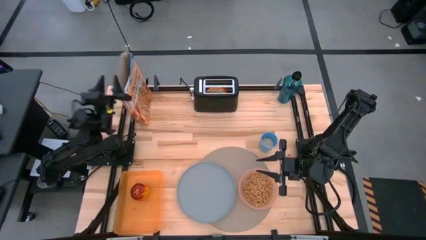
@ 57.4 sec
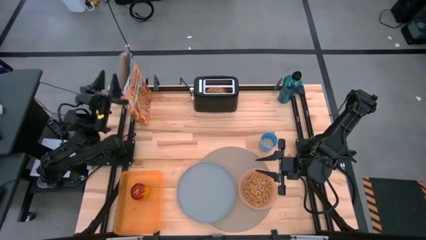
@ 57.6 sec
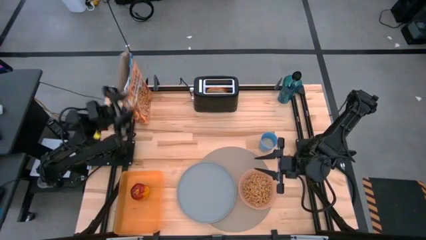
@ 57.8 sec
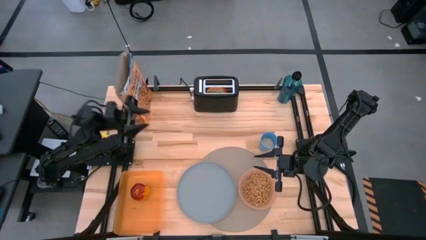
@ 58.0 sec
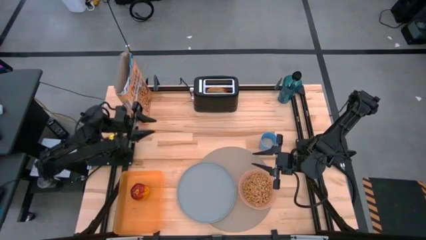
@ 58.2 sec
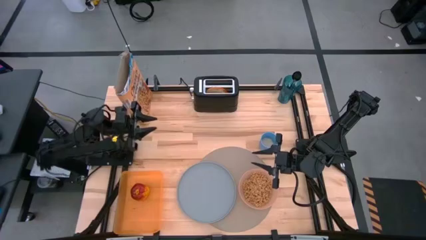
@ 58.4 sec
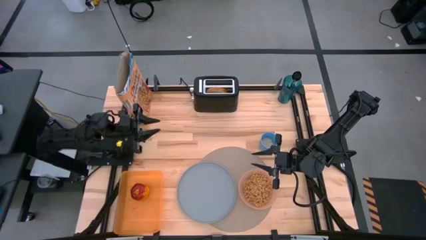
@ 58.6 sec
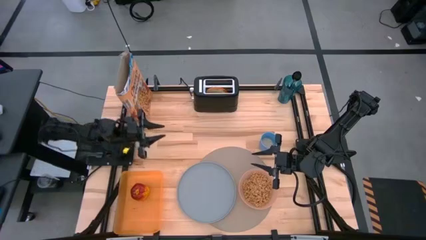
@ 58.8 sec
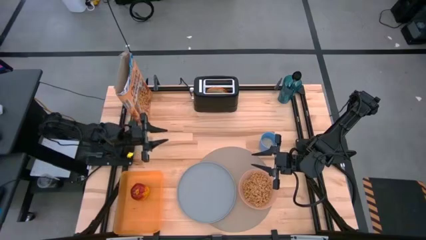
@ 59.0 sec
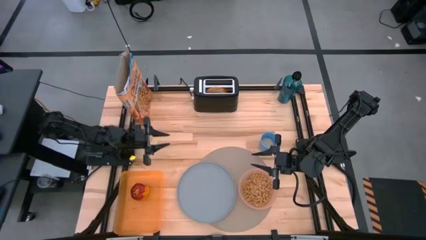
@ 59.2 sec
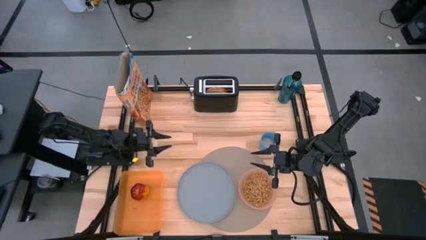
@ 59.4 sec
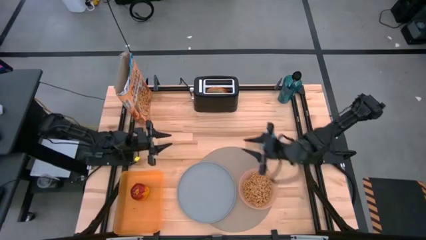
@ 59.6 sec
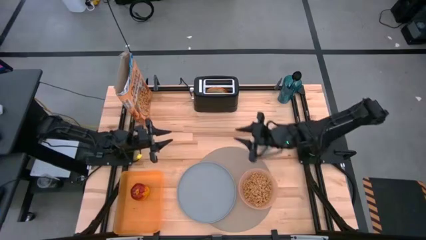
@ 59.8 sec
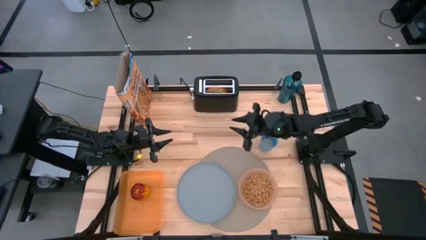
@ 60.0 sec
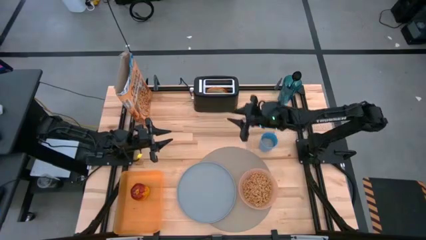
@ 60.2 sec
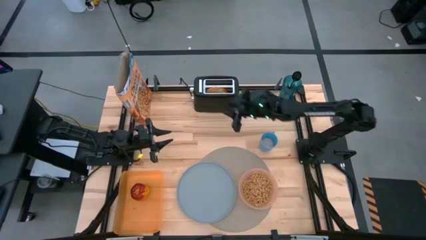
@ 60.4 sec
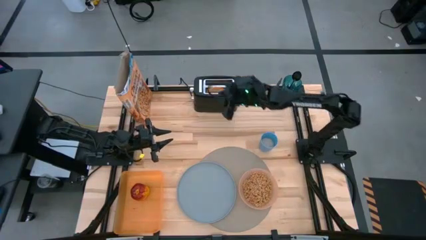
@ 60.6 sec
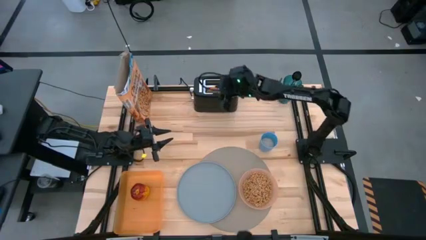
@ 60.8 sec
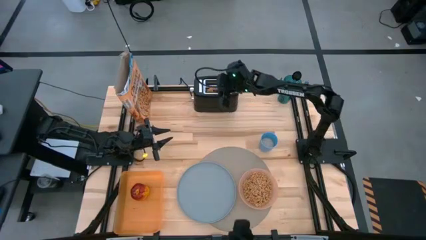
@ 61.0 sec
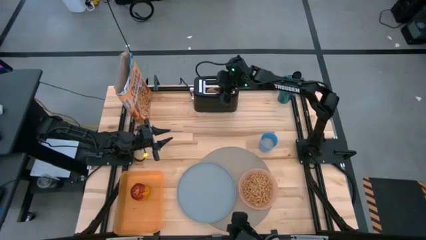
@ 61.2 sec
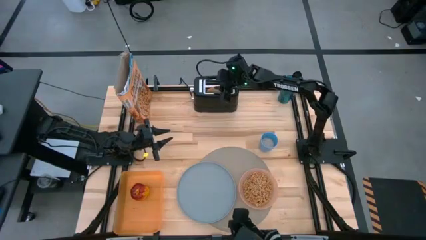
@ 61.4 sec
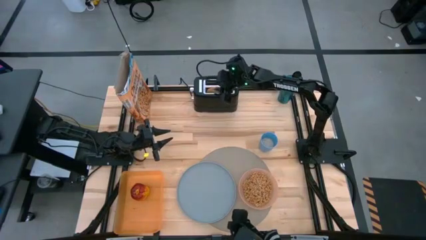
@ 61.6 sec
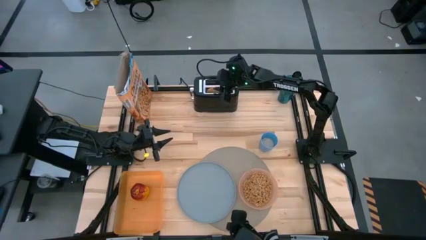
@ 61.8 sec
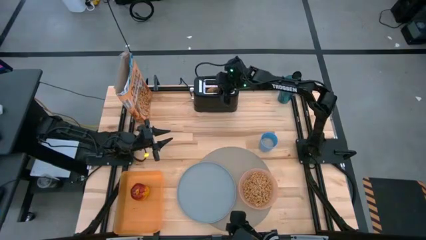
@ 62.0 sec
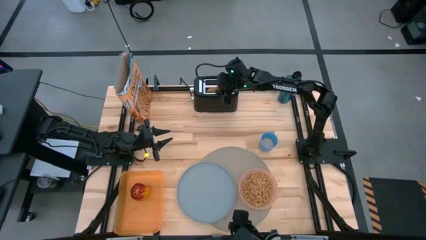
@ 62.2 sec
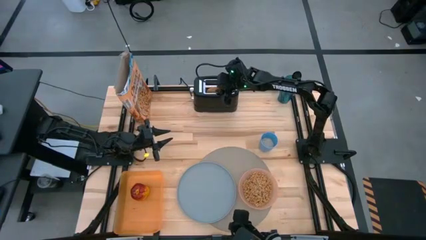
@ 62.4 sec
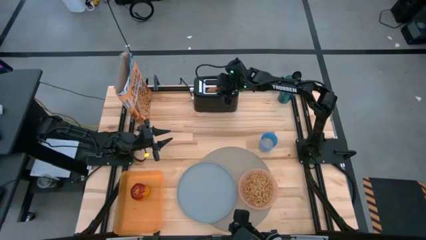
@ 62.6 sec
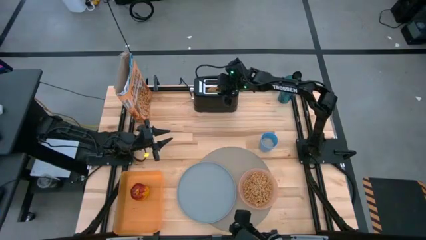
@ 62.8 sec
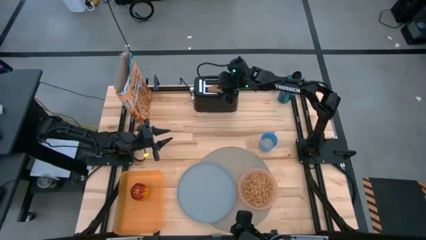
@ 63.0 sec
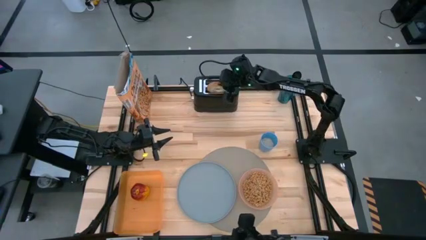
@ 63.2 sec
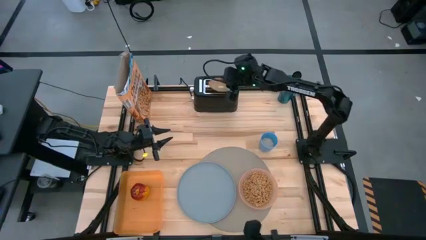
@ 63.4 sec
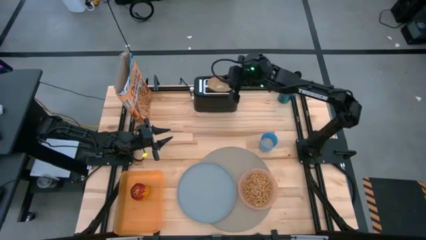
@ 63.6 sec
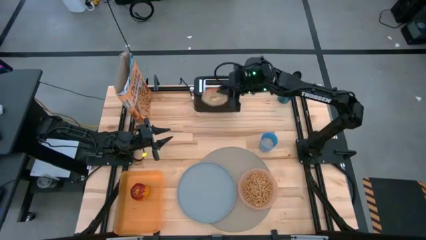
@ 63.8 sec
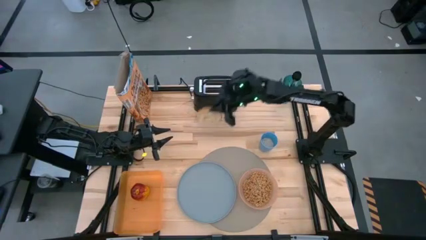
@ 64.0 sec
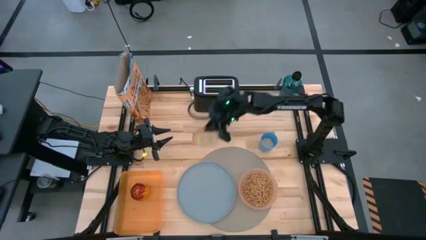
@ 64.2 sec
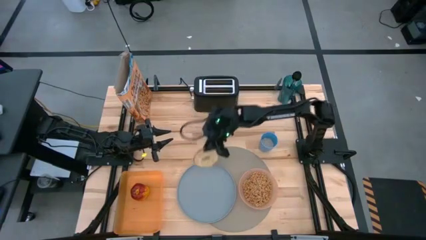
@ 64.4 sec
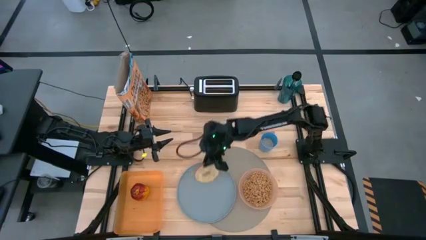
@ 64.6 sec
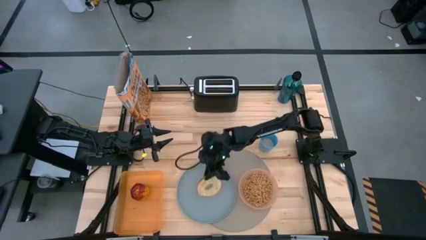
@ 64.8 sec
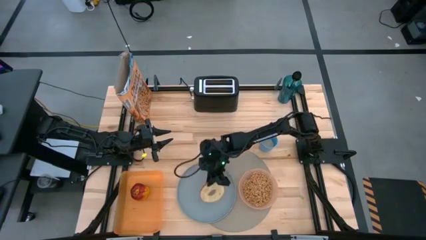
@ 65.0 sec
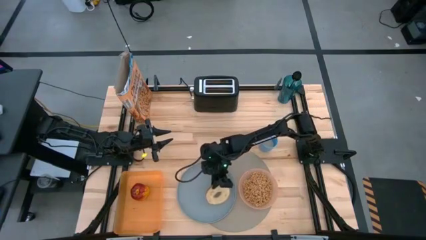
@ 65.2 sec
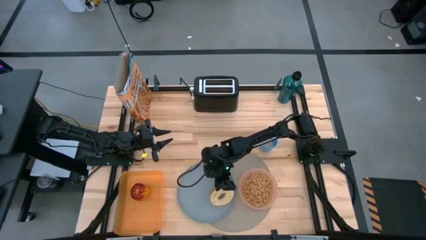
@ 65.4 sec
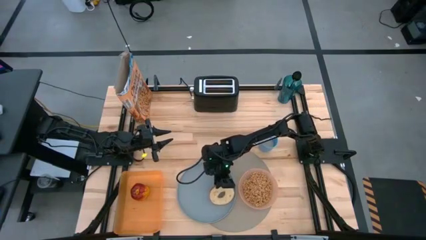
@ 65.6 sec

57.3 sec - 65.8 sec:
Task: Arrange a breakfast setting
Put the toasted bagel on the blue plate

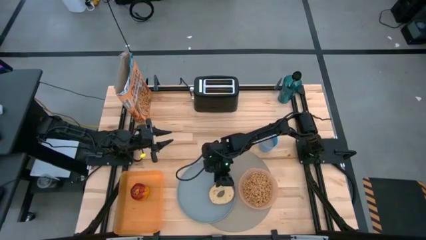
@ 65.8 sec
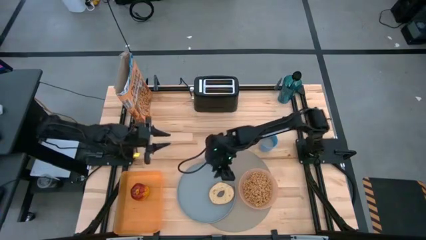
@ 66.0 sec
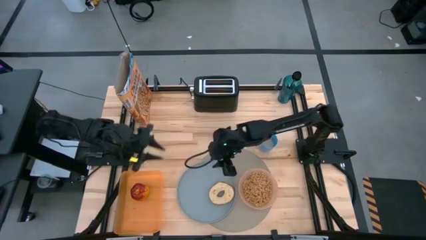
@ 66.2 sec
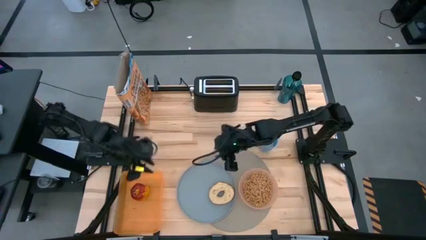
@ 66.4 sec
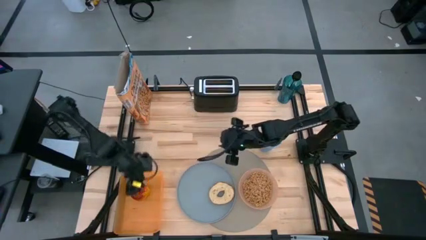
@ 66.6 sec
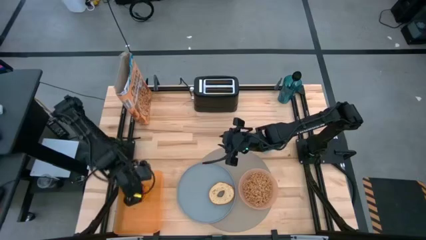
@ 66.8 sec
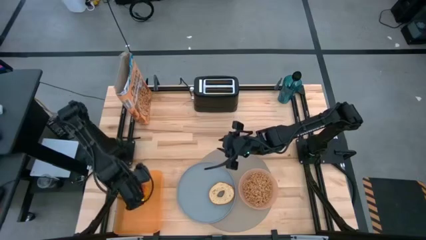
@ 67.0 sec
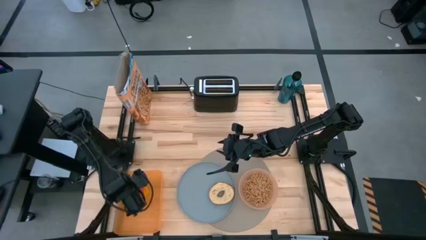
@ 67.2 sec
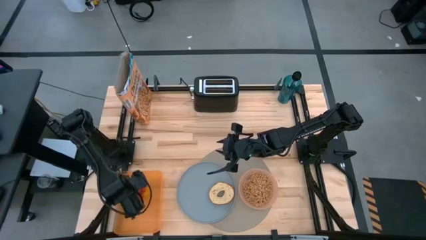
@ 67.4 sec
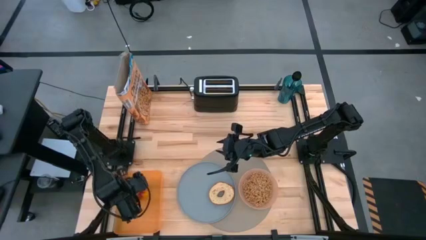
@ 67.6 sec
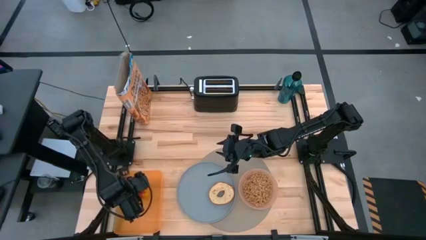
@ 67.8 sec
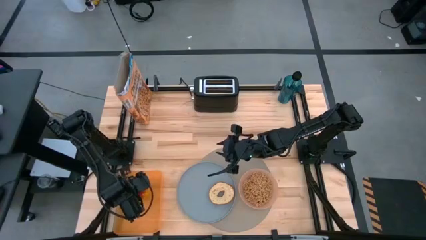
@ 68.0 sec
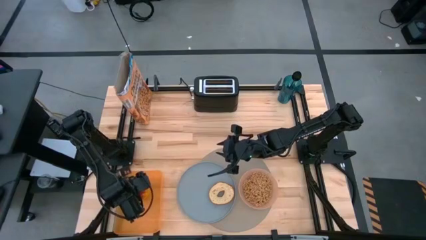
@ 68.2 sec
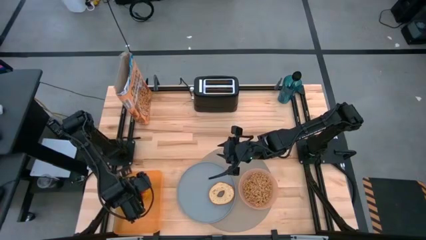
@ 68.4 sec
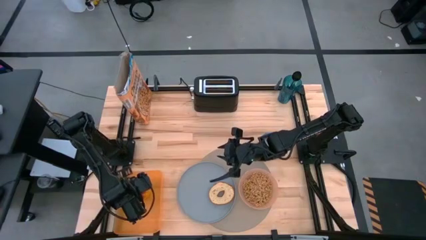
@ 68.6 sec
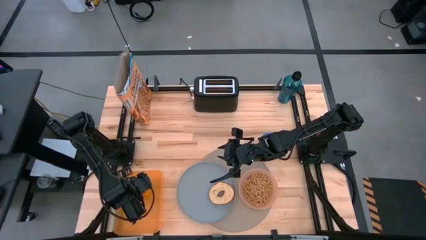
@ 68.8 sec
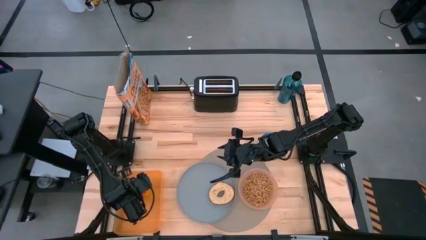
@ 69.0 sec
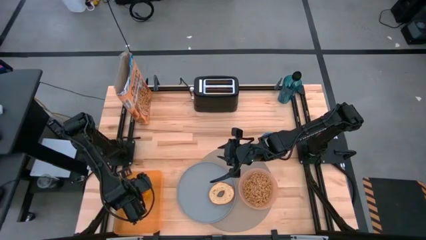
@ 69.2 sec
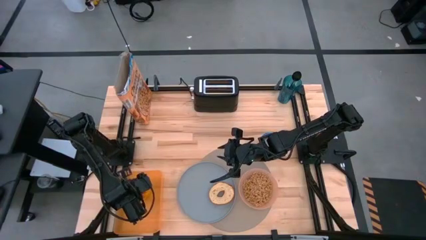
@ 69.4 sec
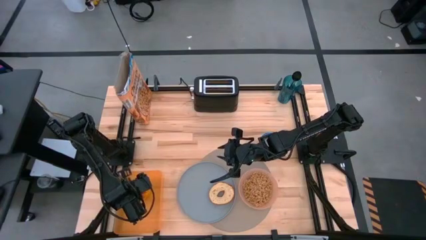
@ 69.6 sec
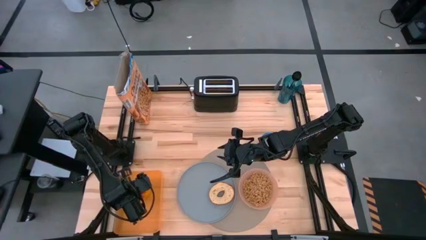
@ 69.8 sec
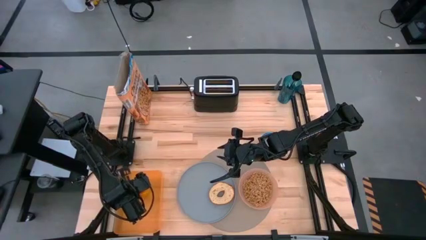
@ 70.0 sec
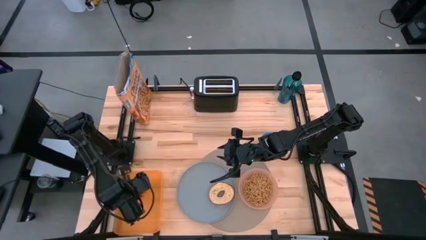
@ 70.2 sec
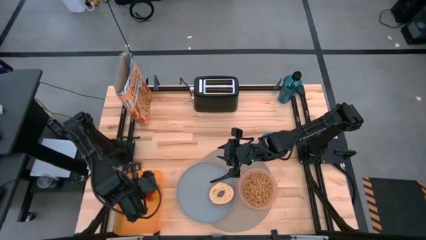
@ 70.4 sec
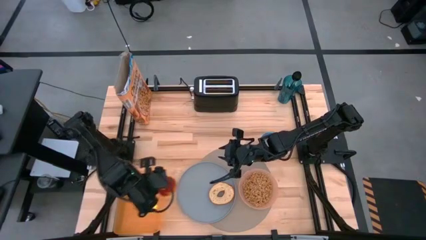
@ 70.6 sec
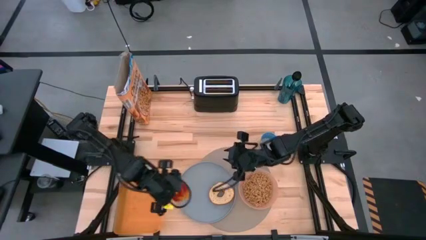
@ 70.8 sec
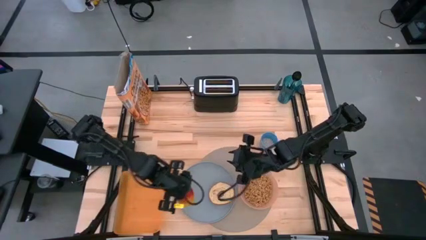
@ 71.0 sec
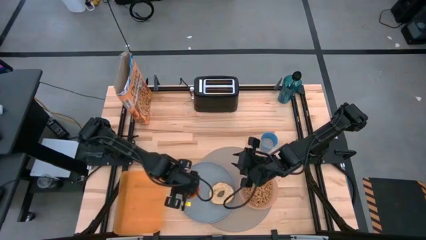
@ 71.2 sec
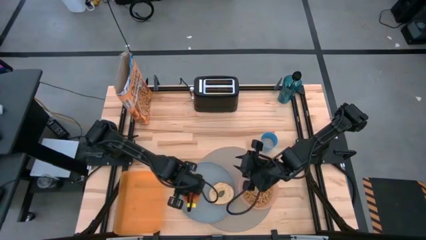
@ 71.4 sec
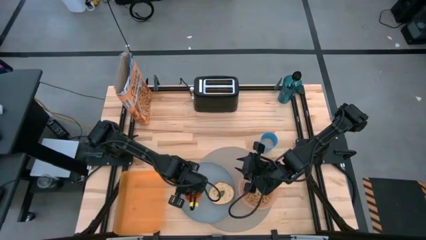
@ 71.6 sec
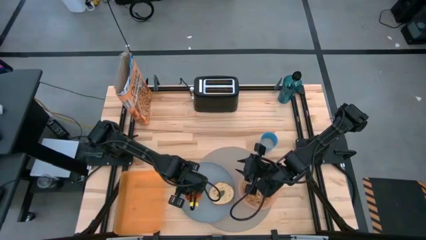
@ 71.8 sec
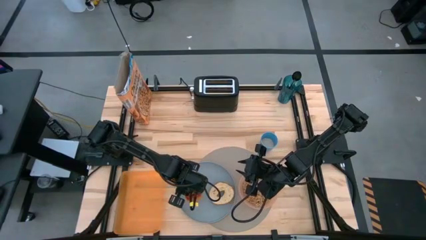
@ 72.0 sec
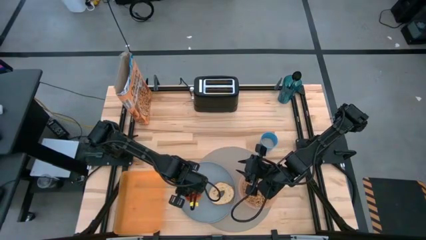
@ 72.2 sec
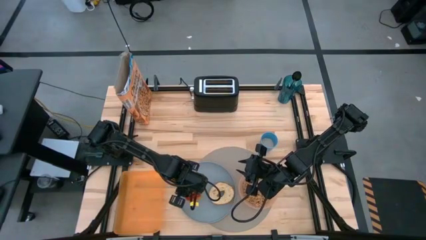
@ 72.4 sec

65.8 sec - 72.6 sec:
Put the red apple on the blue plate

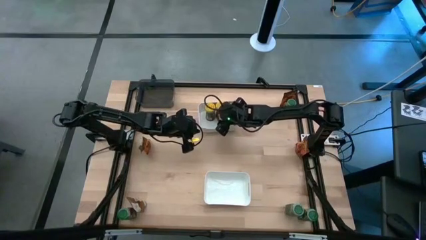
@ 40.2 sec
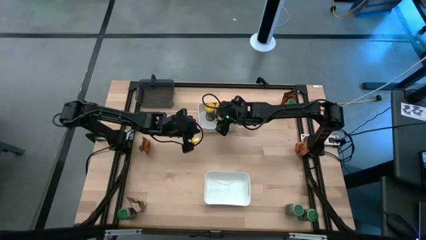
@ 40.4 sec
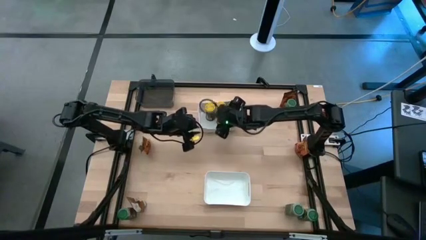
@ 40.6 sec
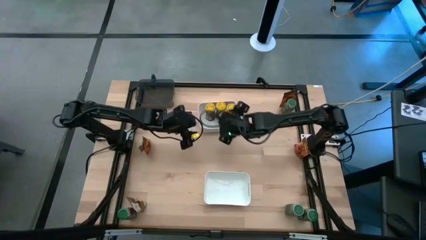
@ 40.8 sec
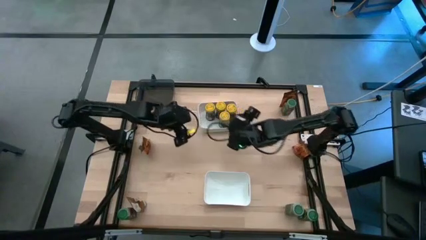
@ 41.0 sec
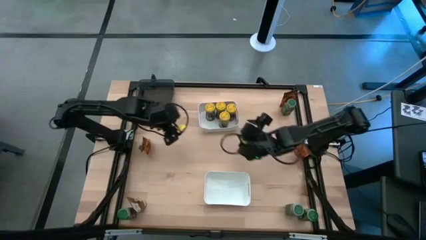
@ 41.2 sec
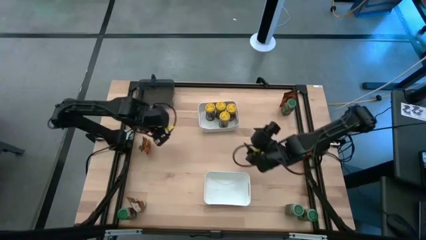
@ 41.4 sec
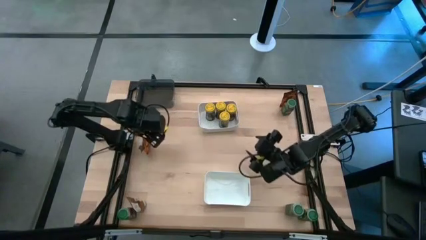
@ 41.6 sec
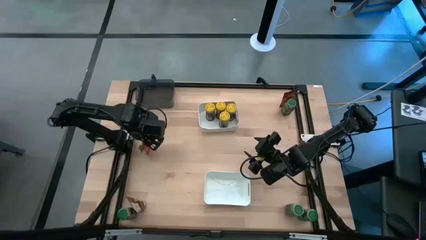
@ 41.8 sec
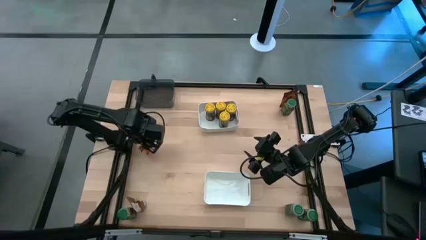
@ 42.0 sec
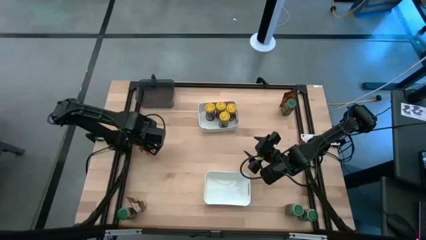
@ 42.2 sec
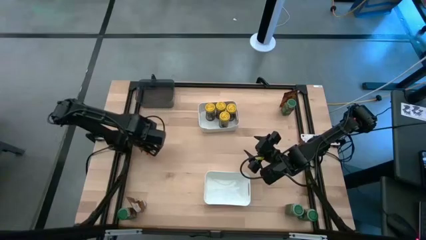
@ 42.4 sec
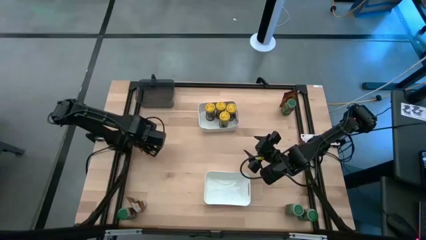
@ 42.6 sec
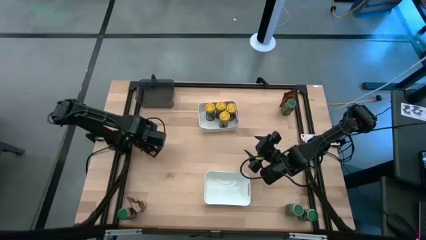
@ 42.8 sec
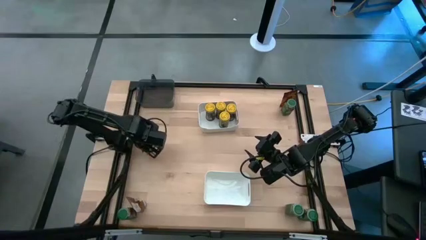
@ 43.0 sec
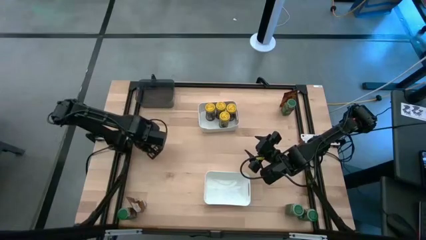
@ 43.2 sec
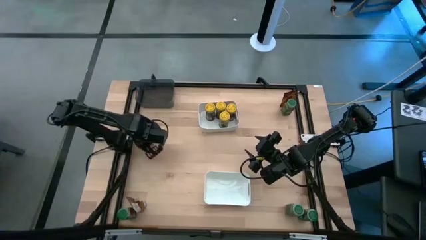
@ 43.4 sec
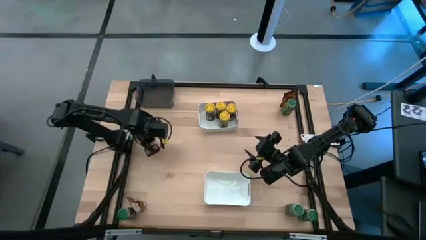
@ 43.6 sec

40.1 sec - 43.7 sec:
Task: Sort spices by type
Put the orange seasoning pack into the black bin
